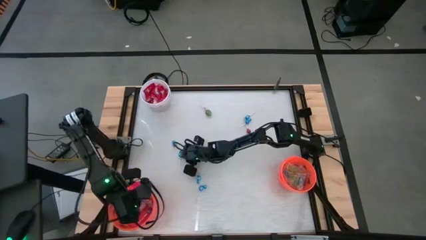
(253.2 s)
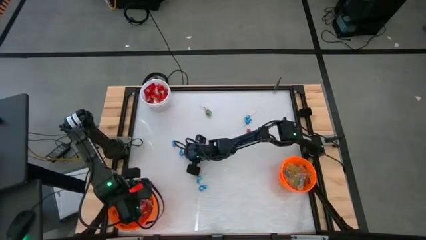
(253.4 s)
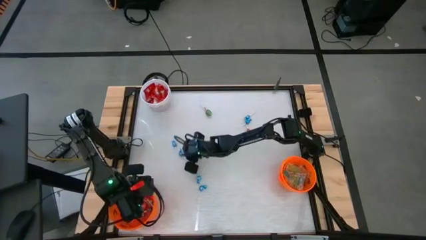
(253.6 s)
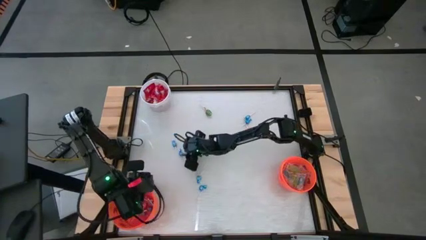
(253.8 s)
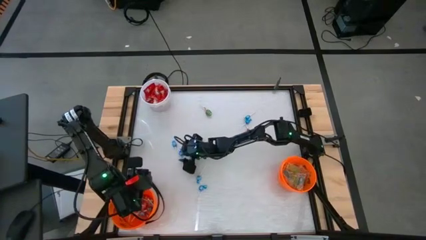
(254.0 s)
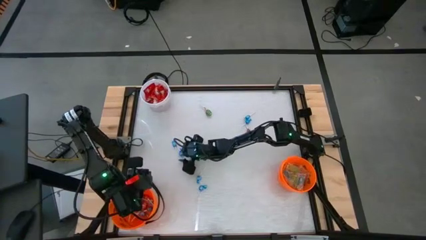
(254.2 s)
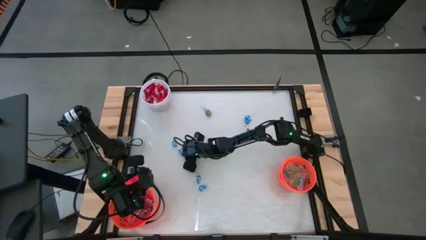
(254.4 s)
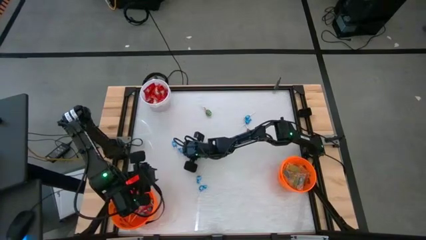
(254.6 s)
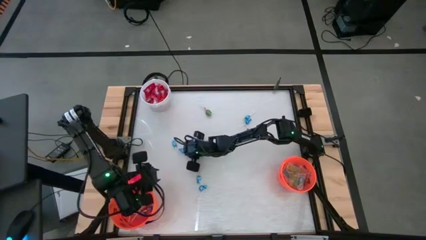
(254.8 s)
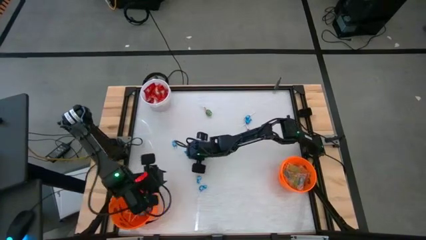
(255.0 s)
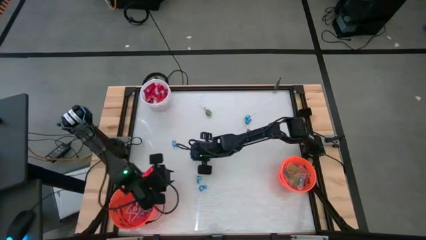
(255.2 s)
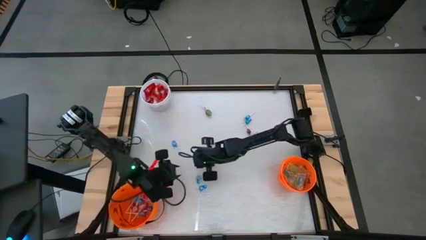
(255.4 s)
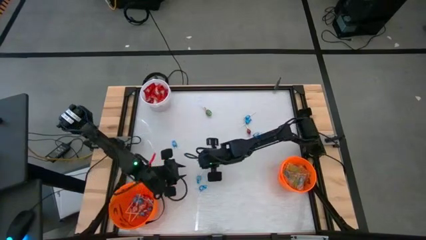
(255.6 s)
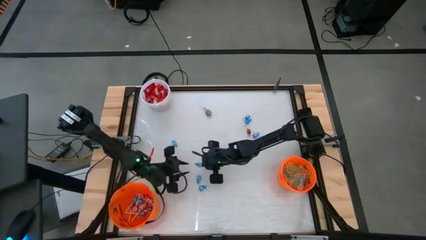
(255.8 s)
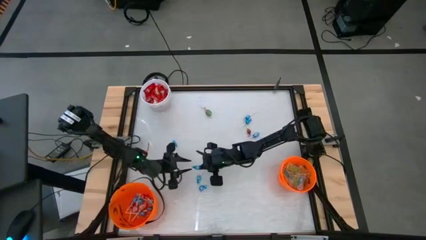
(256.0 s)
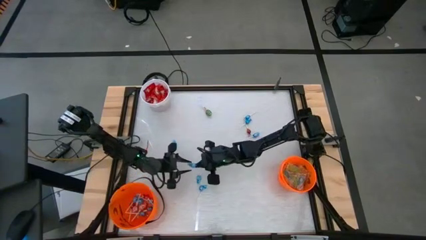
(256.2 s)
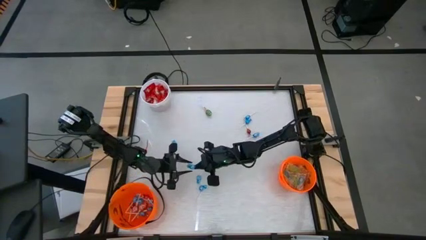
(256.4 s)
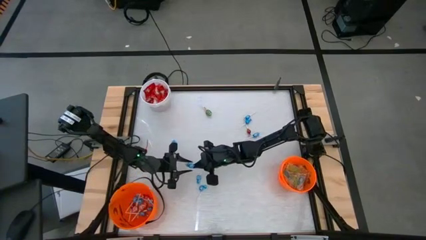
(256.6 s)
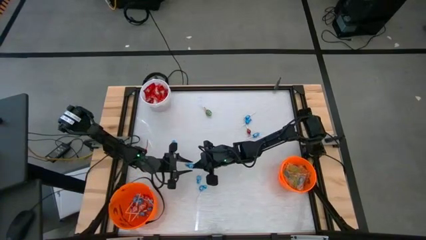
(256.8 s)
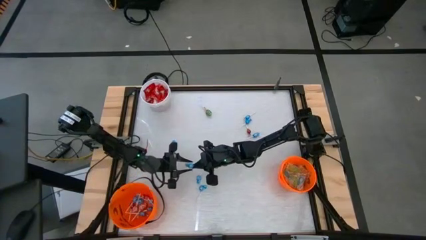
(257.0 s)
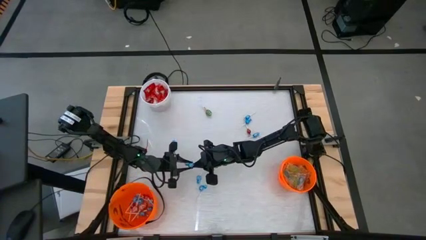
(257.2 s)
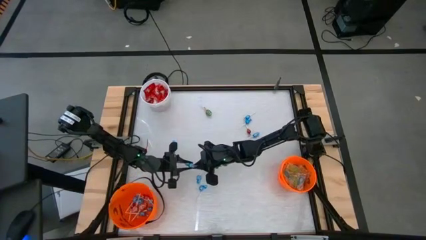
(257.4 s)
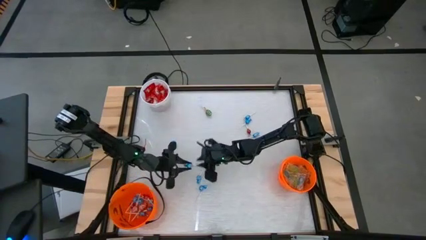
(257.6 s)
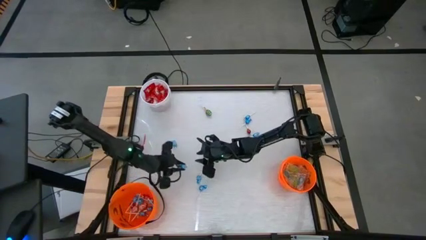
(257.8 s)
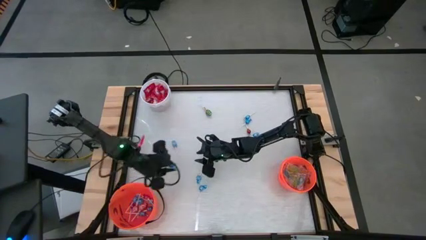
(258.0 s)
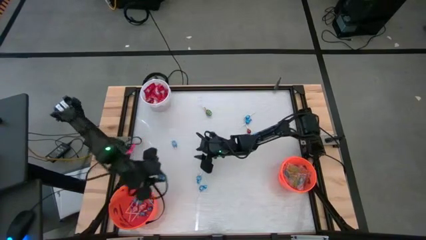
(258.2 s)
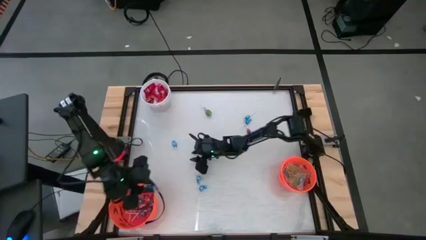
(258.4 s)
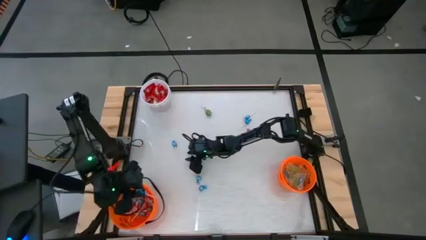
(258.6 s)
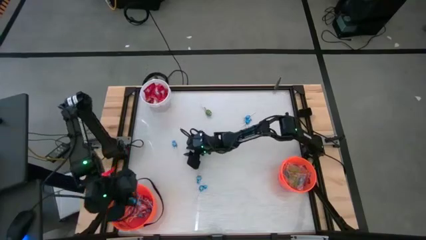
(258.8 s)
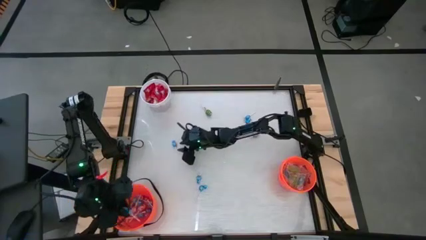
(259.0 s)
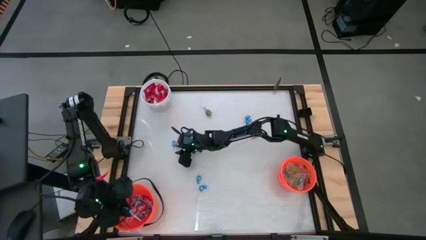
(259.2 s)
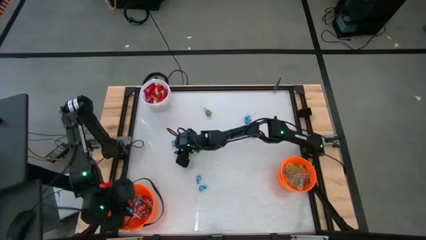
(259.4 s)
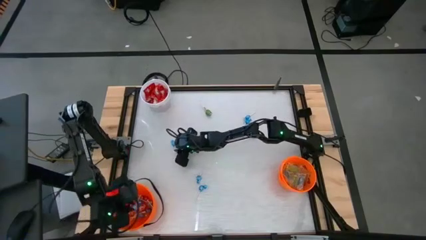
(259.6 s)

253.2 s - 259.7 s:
Task: Sort candy by brand, put in halloween buckets
Put the blue sucker into the left orange bucket

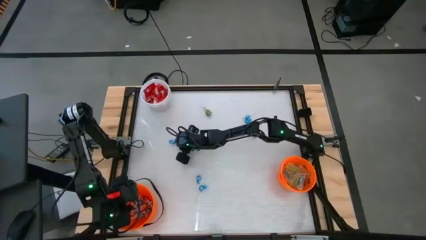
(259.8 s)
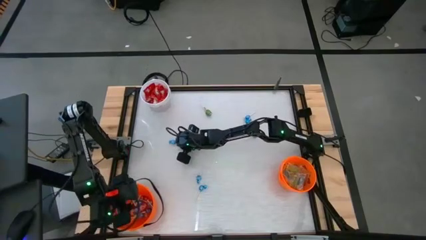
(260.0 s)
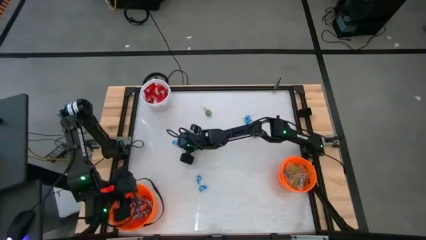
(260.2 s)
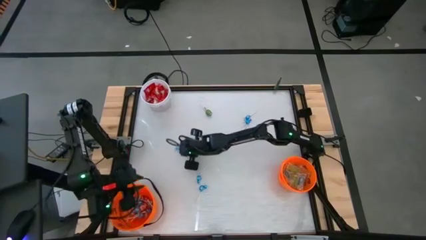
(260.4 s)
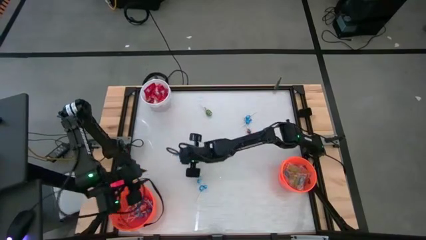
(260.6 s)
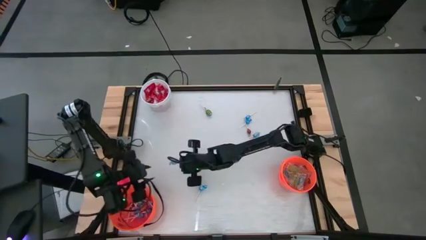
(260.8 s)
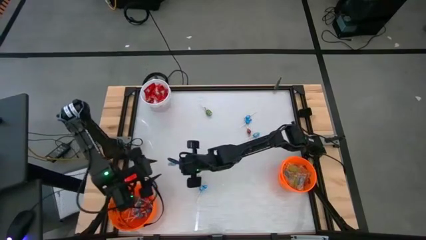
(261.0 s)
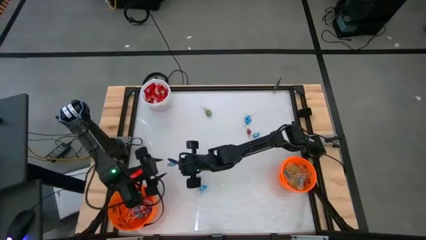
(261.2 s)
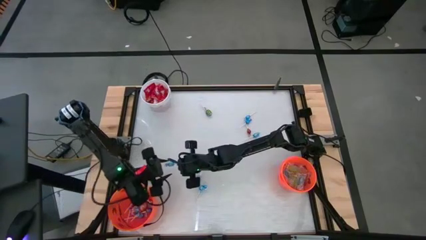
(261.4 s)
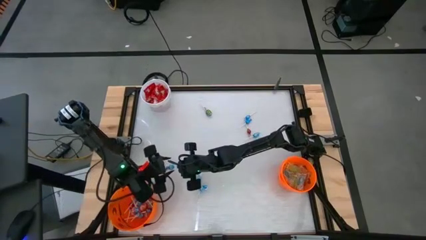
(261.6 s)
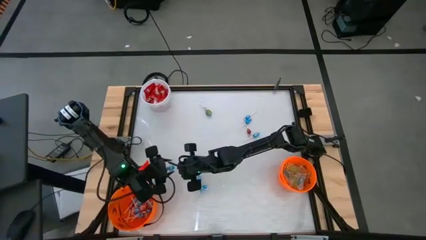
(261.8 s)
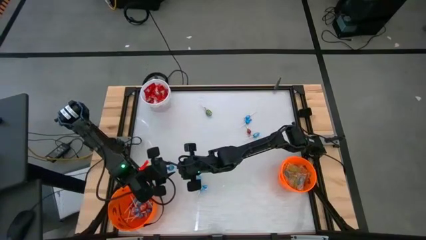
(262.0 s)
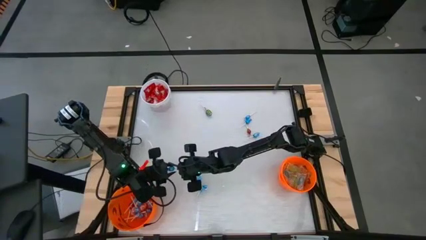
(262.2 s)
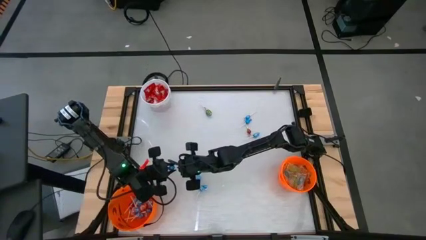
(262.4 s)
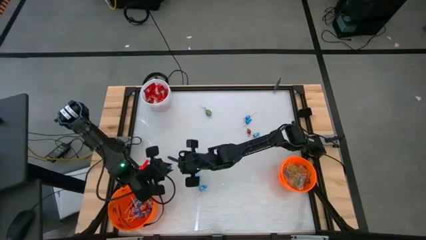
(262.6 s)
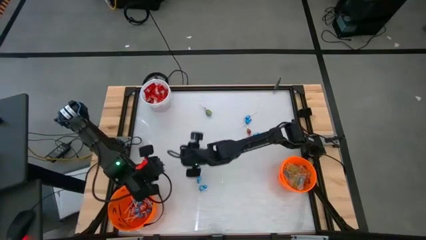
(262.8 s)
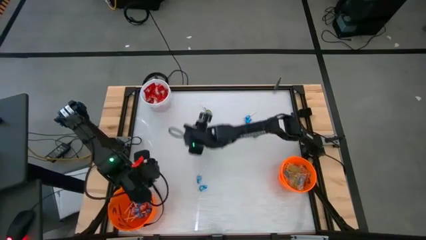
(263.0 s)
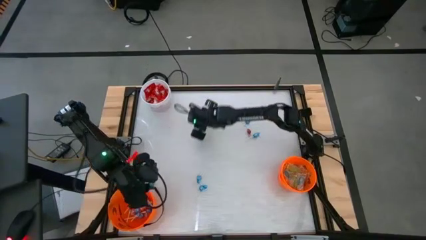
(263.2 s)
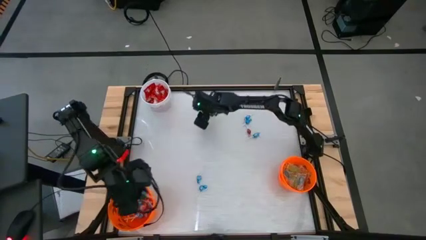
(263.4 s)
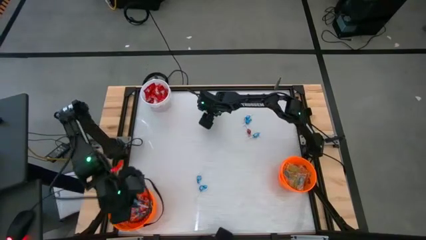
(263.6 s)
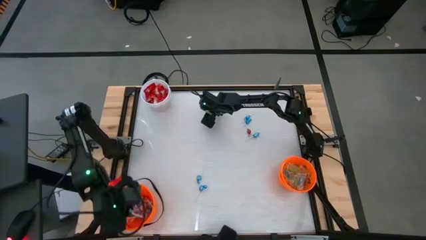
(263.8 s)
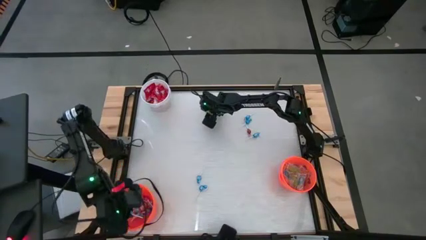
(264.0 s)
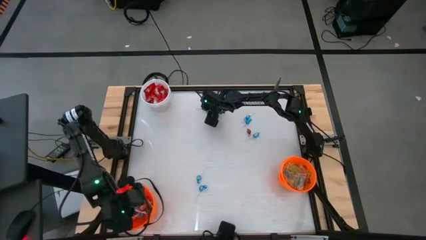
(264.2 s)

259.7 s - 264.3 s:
Put the blue sucker into the left orange bucket

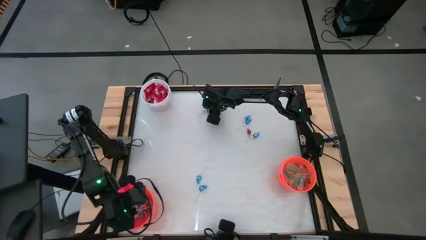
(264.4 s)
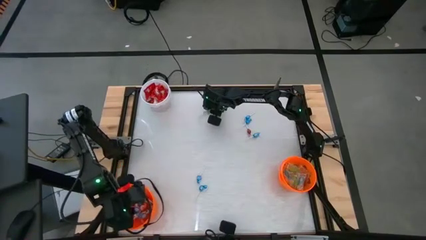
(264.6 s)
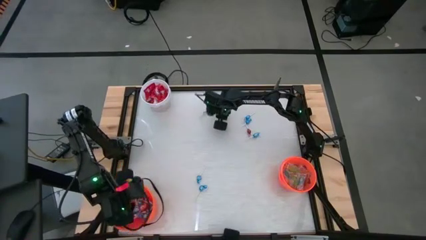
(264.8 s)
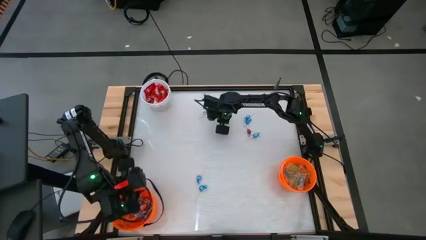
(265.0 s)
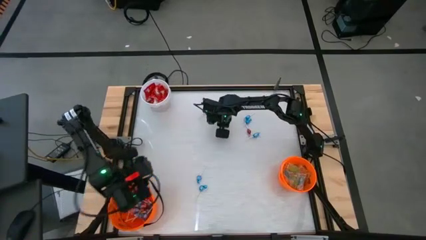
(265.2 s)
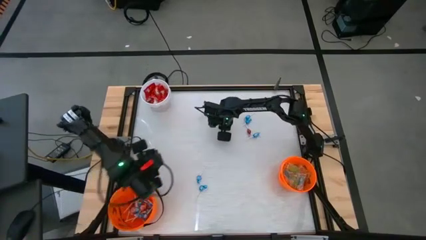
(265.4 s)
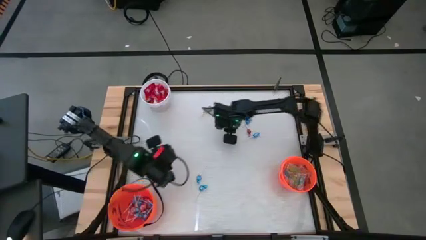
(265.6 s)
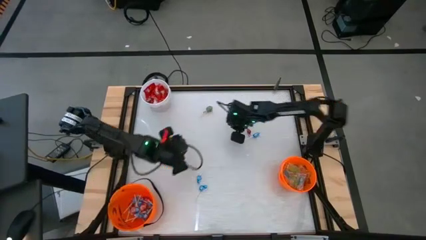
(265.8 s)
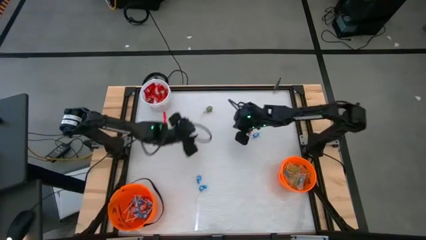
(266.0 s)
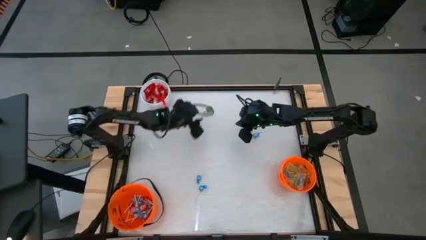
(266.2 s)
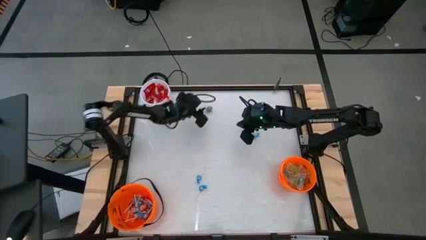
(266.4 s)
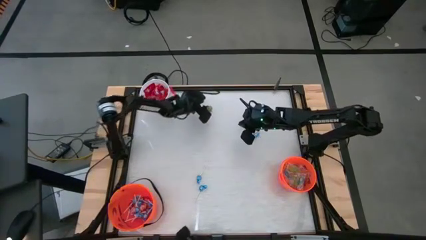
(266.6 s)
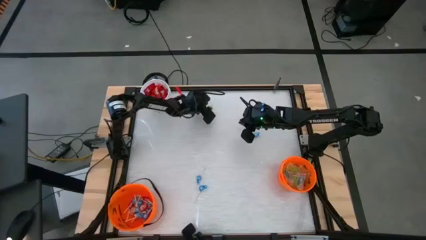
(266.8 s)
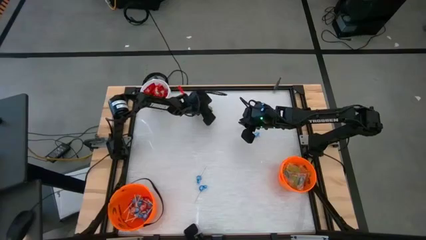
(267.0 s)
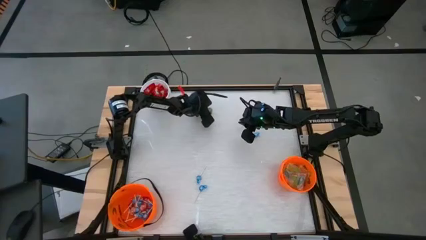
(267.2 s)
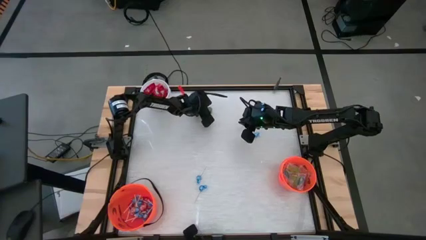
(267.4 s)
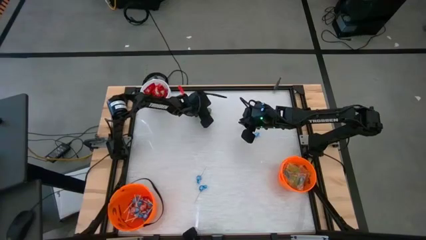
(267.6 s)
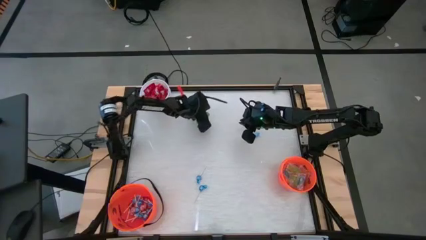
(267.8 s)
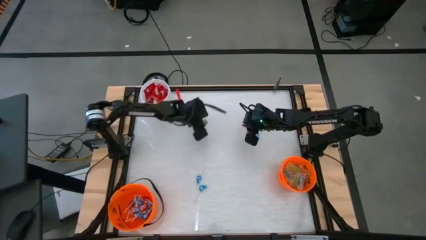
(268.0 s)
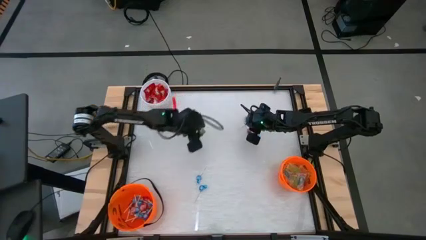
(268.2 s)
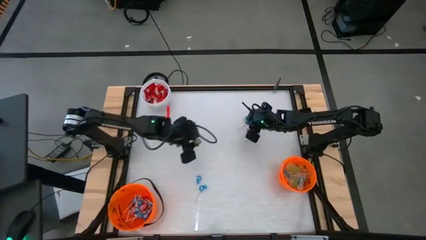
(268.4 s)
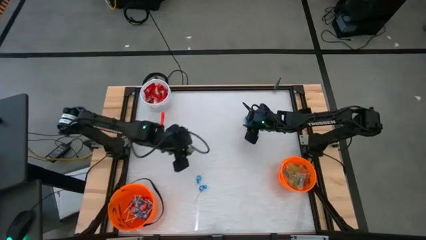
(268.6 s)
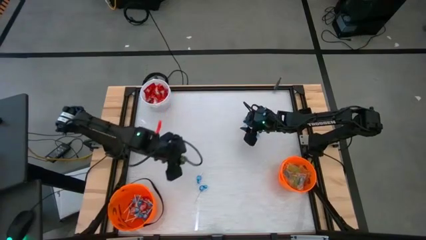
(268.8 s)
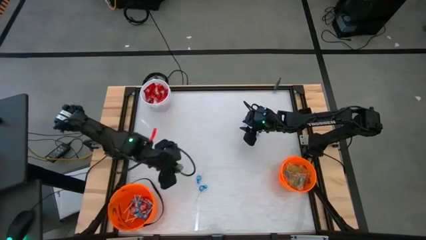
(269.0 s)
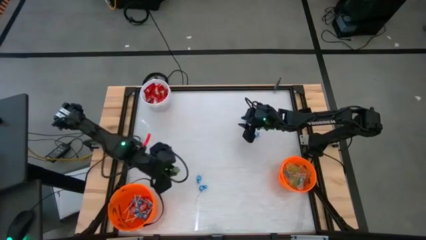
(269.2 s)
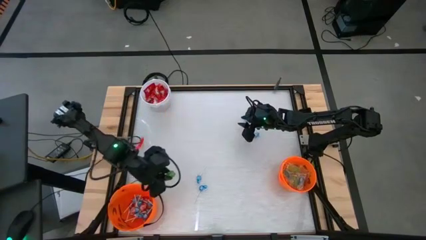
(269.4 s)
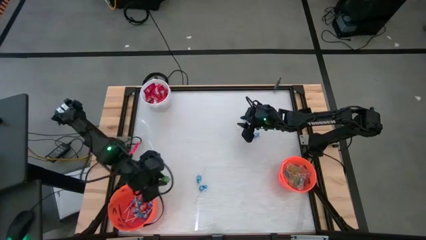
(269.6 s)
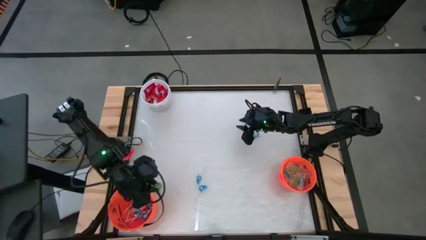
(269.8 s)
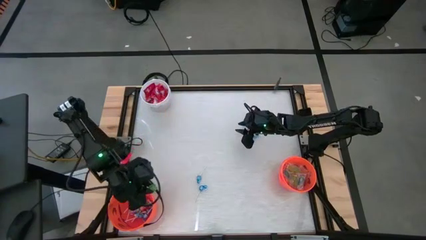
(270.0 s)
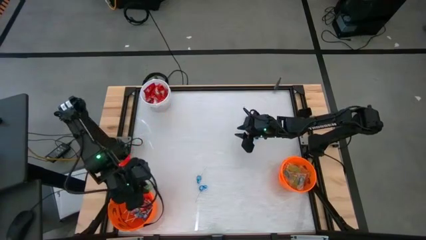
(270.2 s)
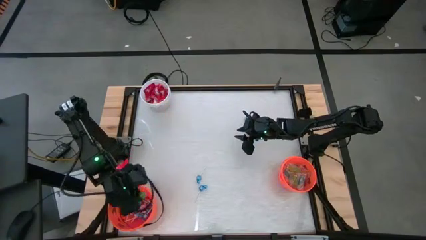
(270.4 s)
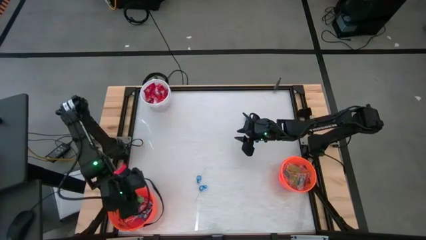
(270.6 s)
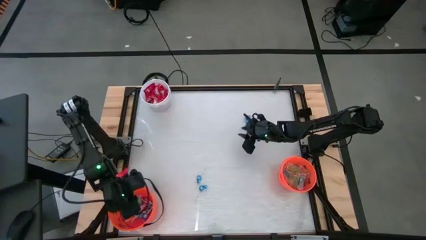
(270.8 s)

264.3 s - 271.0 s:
Put the green sucker into the left orange bucket
